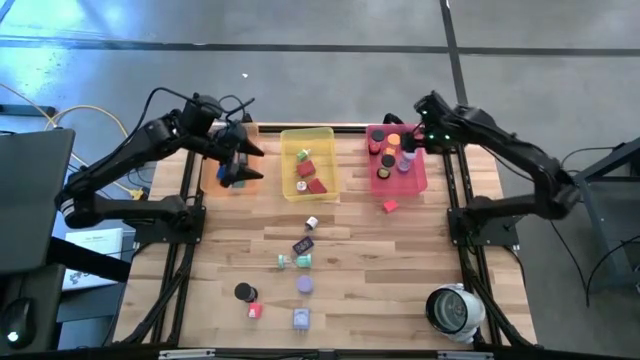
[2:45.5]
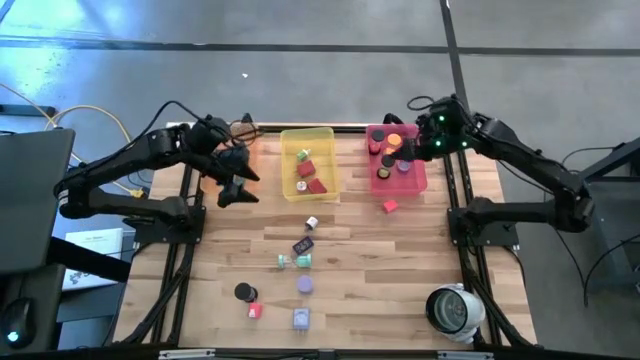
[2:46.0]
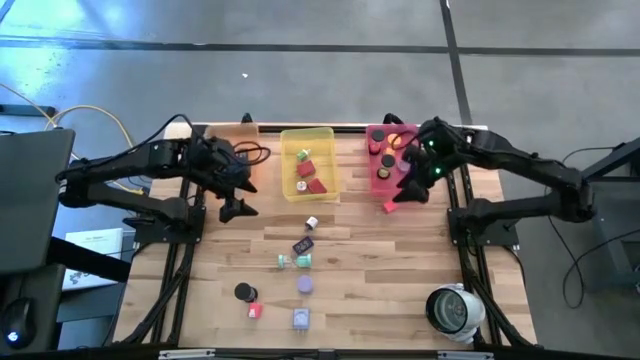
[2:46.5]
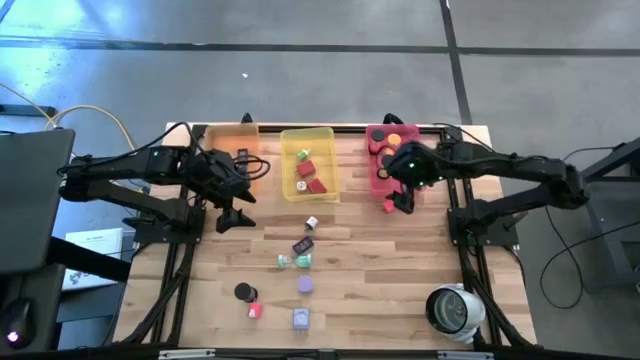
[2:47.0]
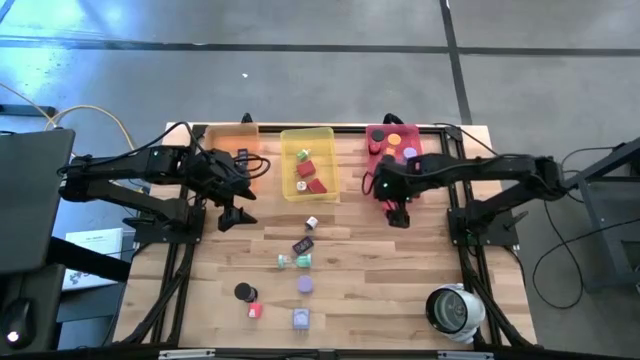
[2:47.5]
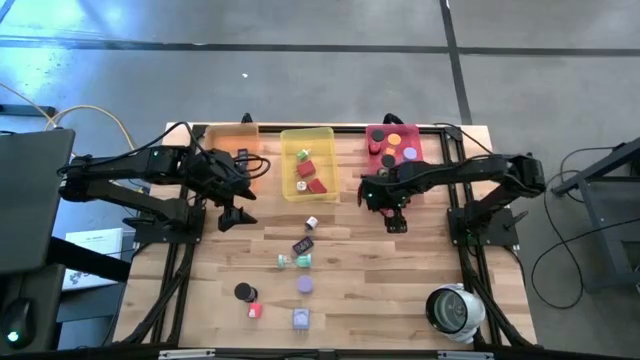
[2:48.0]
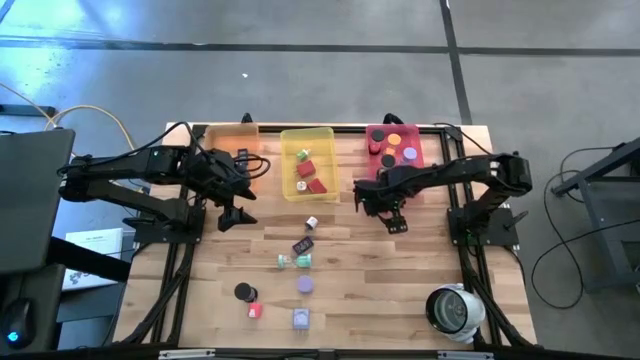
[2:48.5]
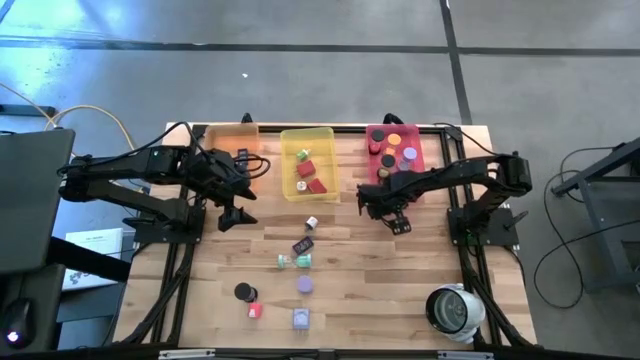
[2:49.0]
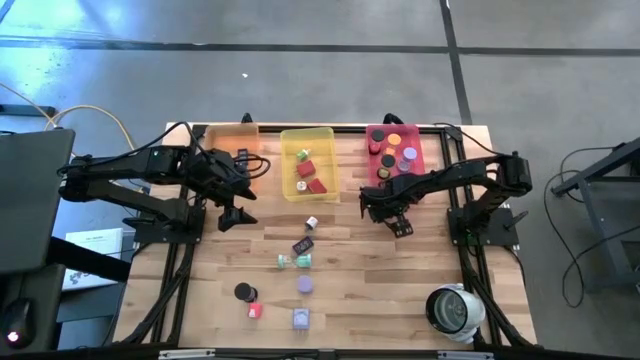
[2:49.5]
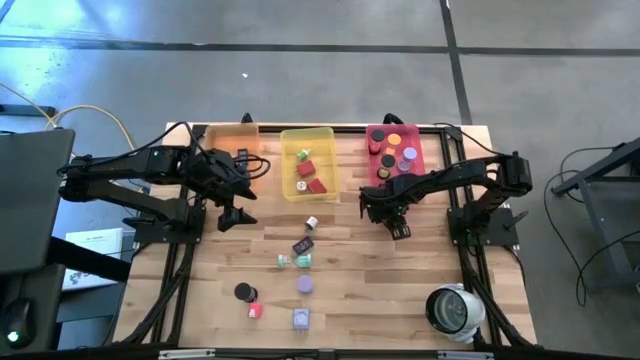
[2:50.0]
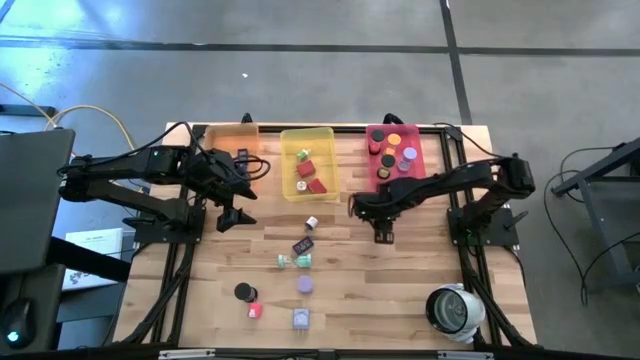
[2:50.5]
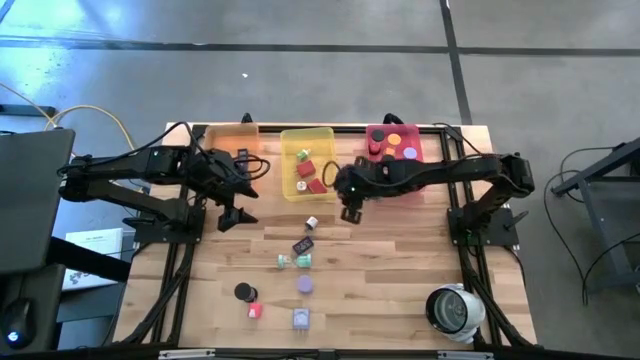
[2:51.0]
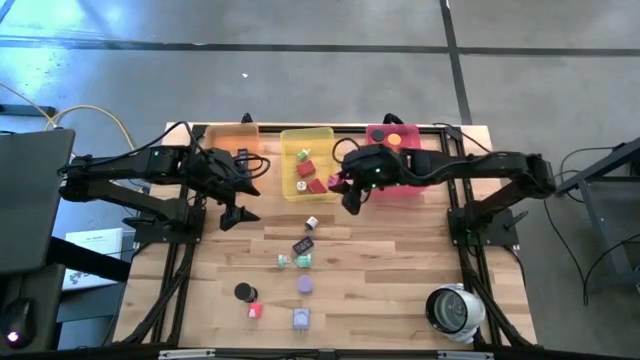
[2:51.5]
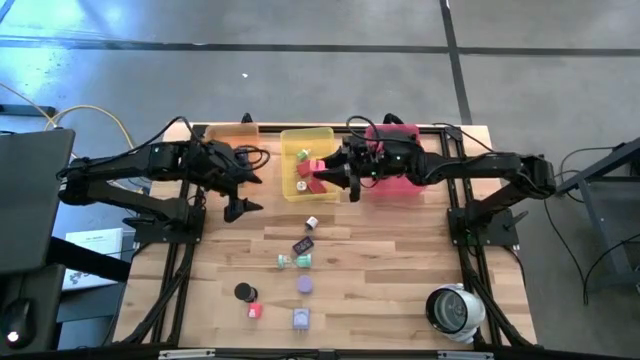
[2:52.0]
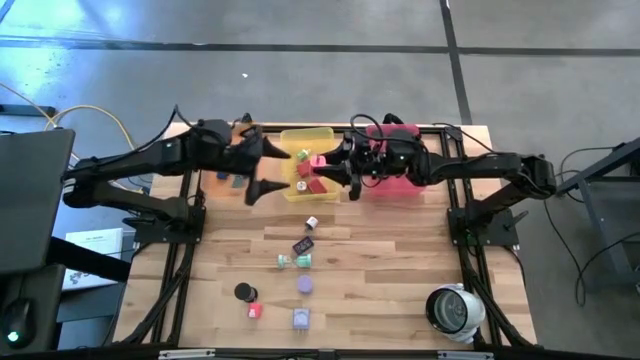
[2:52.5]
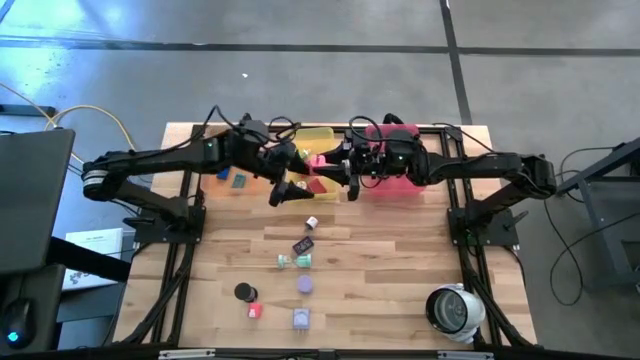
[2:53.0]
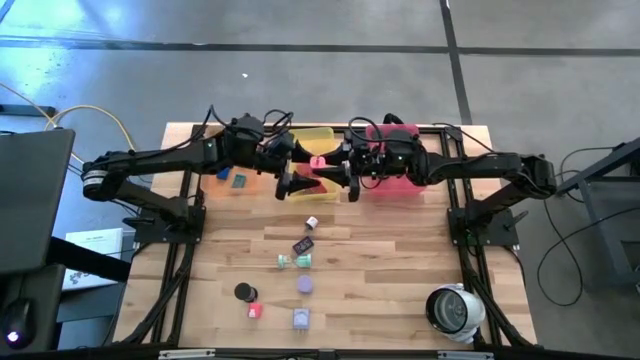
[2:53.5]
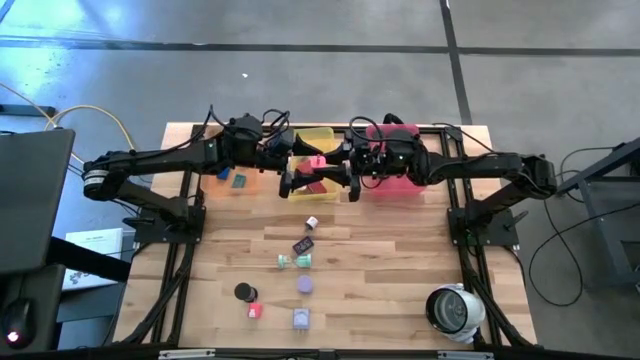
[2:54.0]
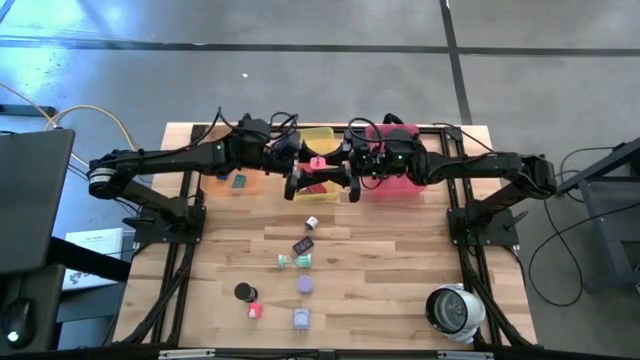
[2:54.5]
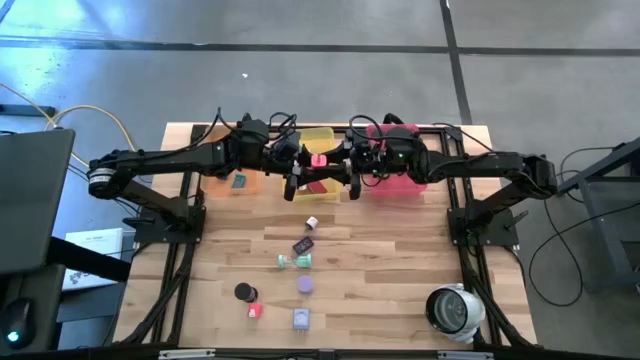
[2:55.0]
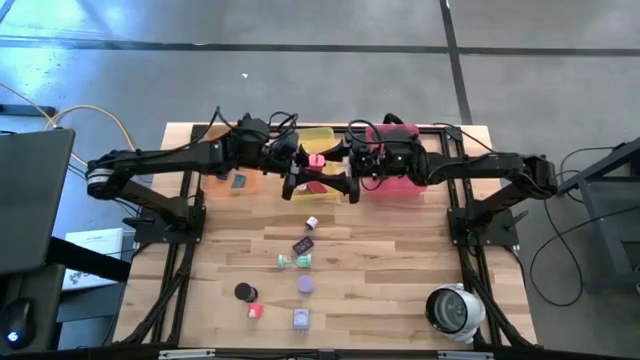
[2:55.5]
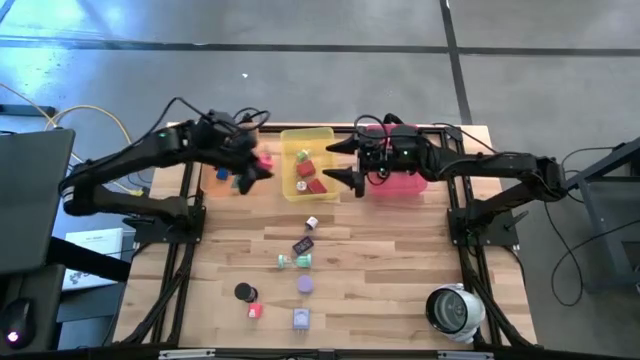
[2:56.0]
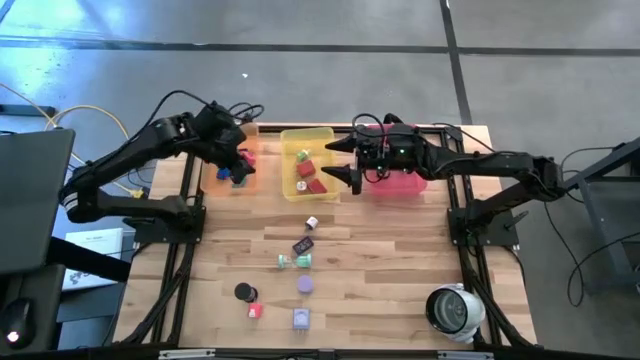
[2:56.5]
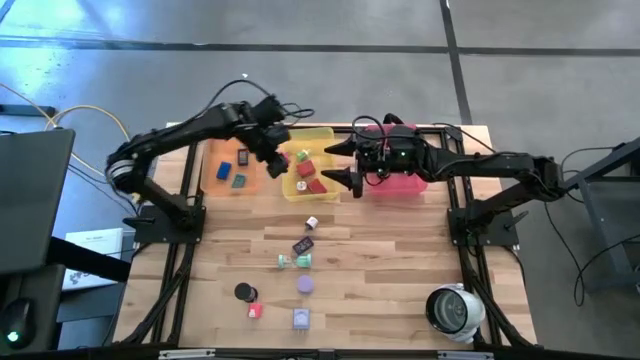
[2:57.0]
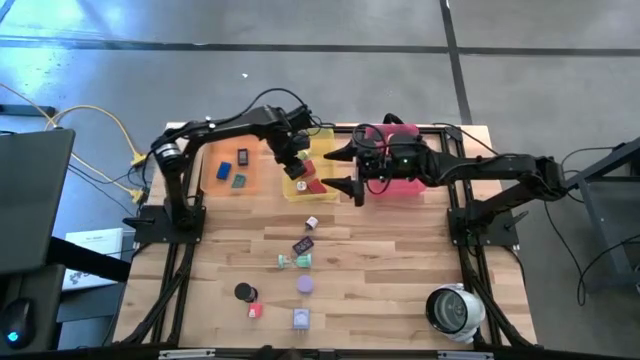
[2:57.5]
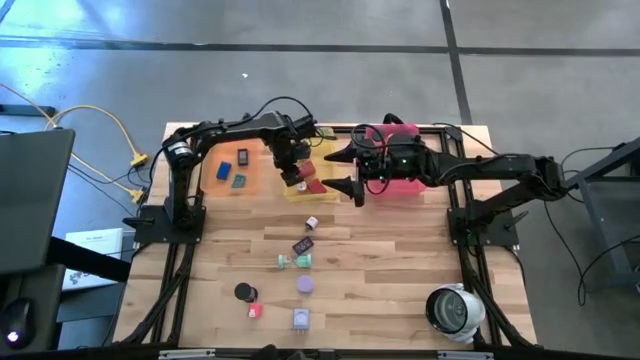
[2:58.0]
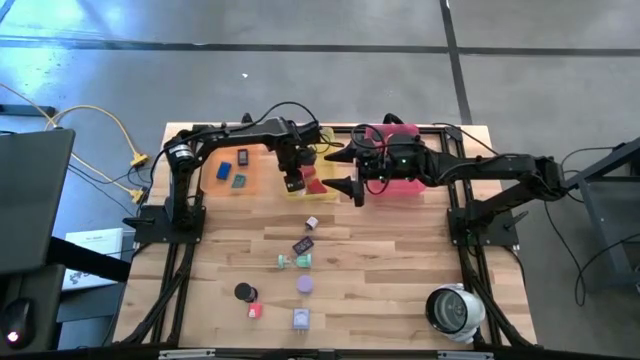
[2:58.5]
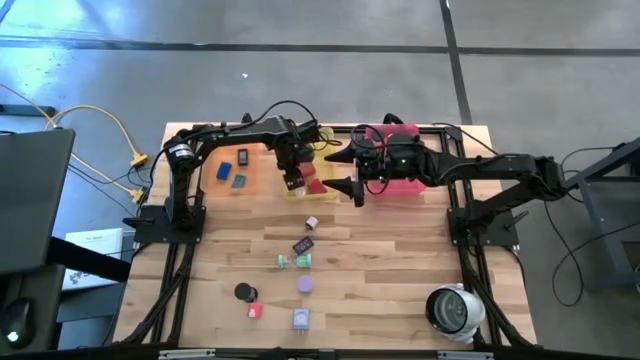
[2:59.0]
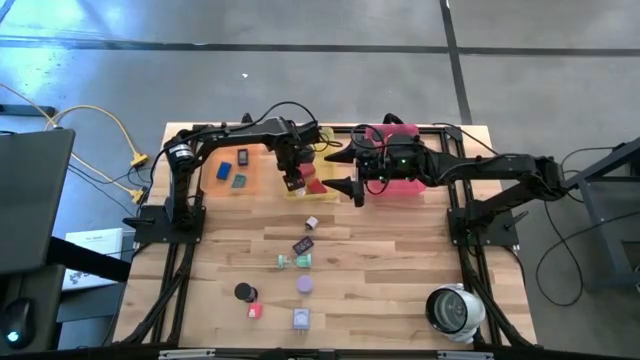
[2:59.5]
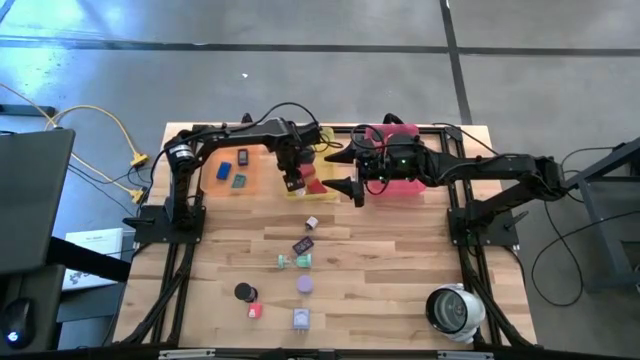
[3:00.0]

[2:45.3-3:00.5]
Task: Pick & Place Office items
Put the right pink charger adapter into the yellow bin
